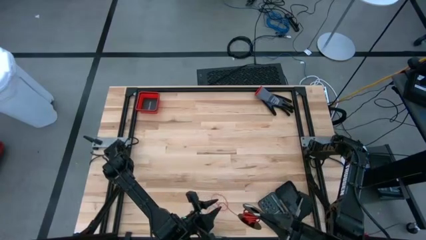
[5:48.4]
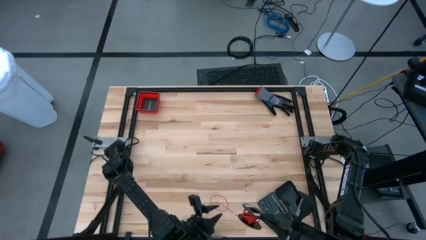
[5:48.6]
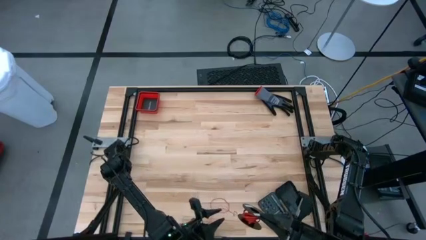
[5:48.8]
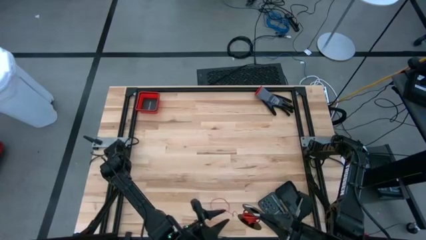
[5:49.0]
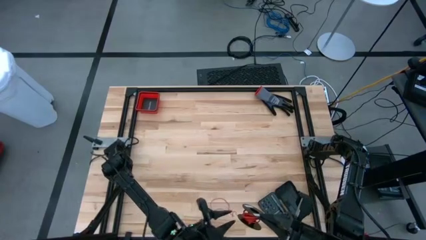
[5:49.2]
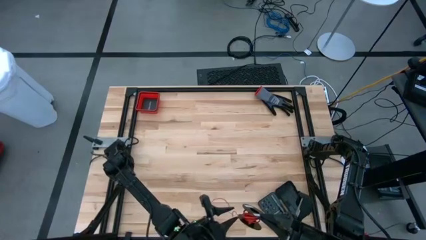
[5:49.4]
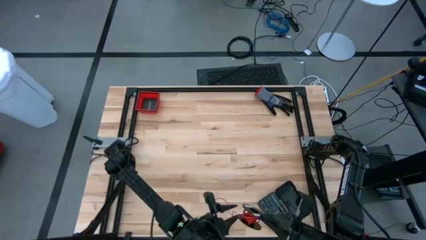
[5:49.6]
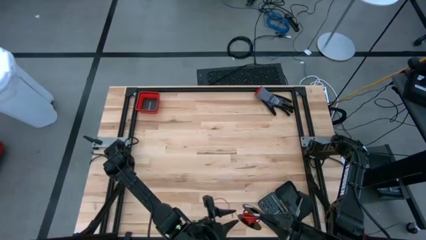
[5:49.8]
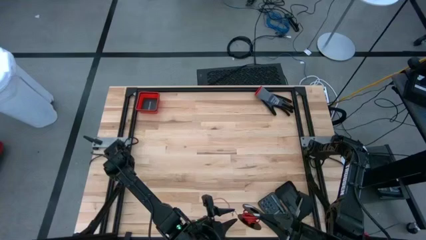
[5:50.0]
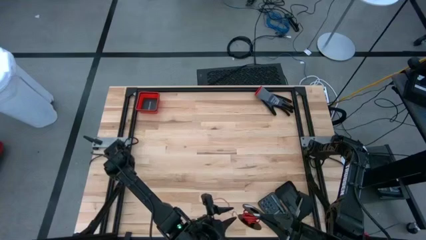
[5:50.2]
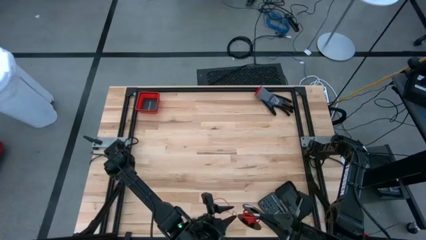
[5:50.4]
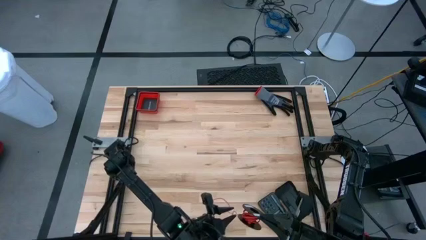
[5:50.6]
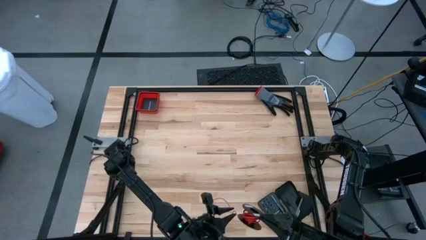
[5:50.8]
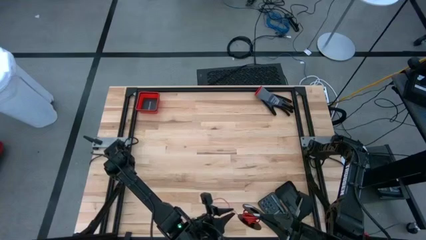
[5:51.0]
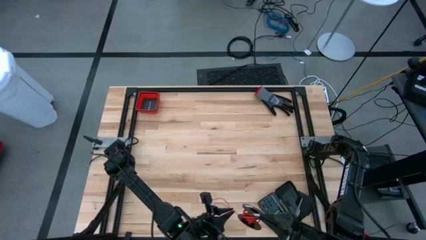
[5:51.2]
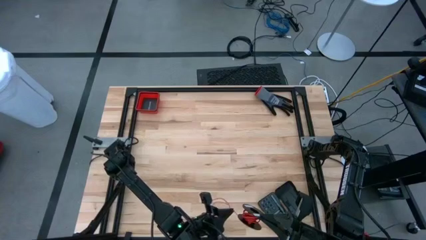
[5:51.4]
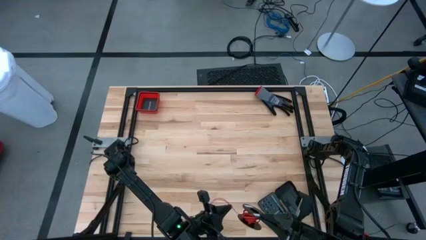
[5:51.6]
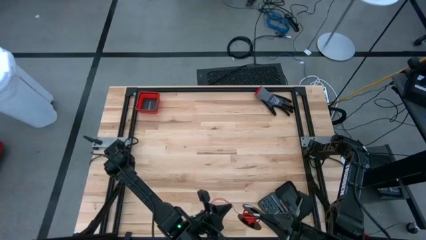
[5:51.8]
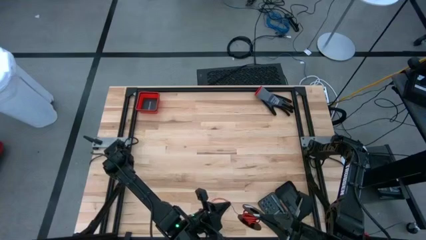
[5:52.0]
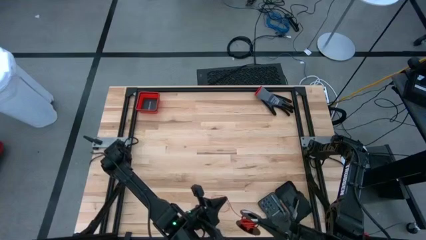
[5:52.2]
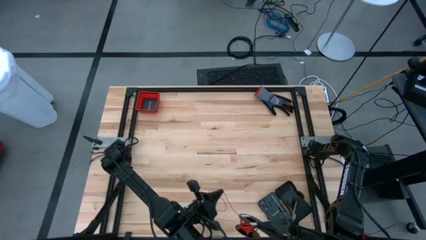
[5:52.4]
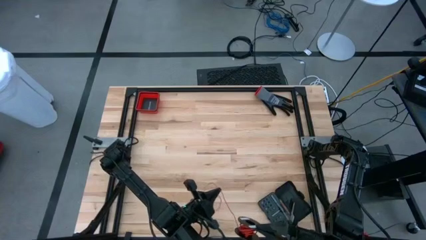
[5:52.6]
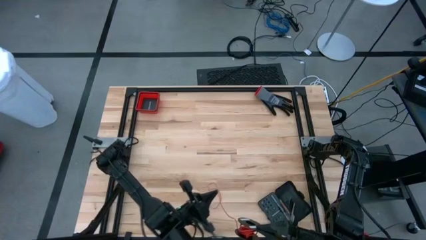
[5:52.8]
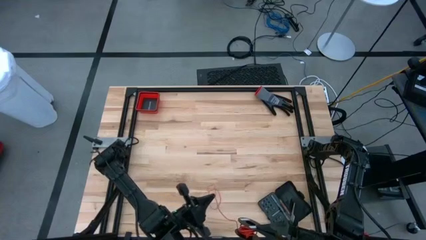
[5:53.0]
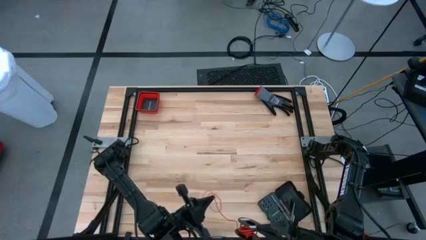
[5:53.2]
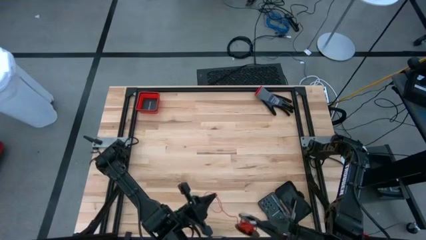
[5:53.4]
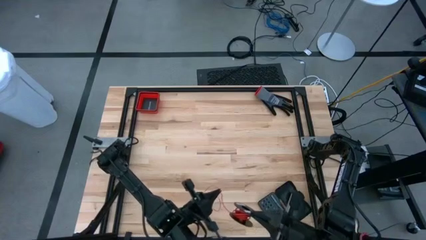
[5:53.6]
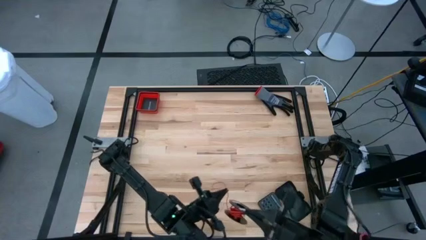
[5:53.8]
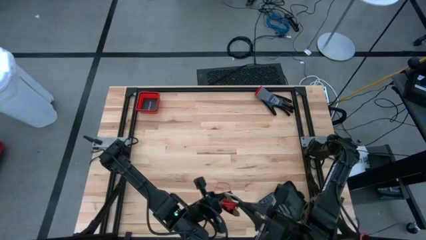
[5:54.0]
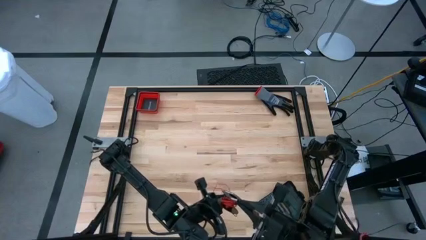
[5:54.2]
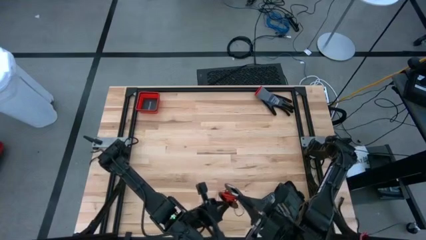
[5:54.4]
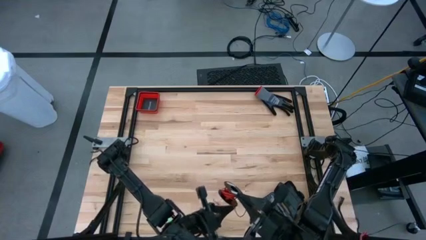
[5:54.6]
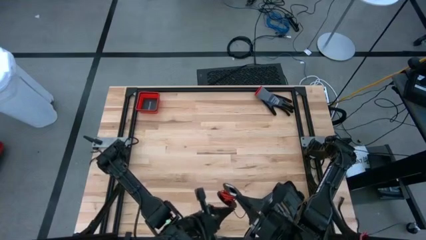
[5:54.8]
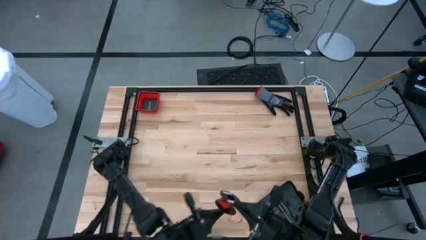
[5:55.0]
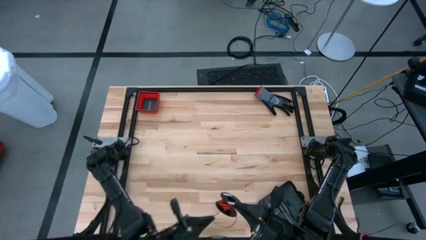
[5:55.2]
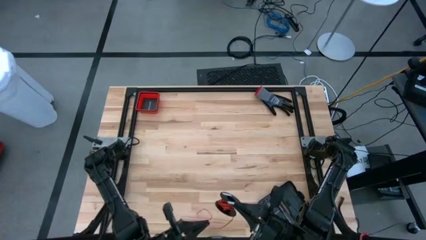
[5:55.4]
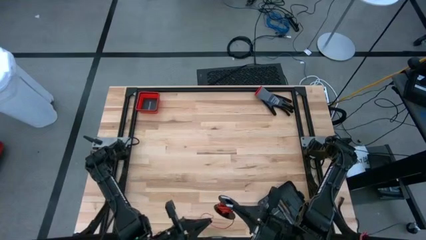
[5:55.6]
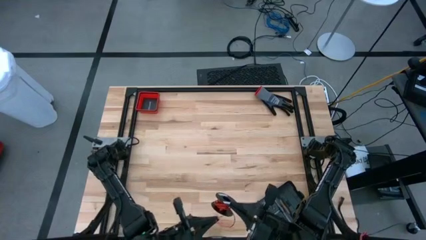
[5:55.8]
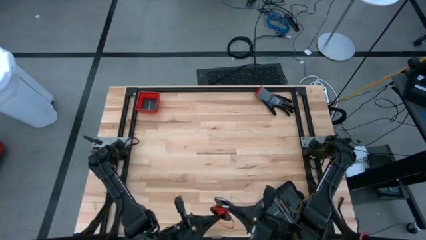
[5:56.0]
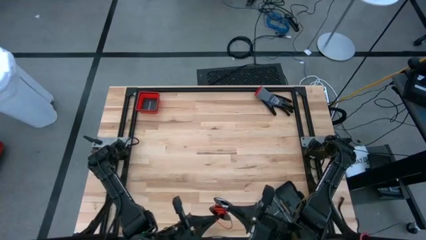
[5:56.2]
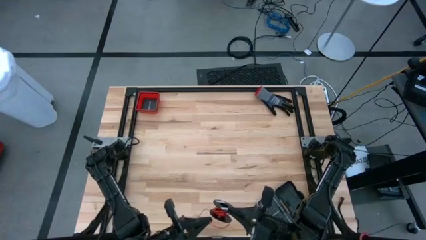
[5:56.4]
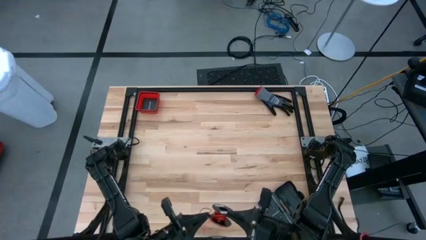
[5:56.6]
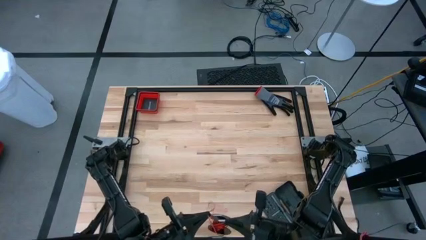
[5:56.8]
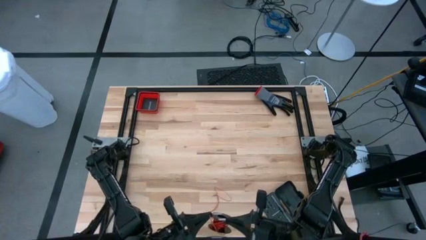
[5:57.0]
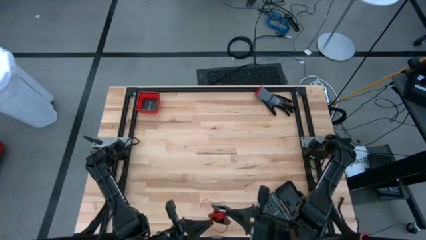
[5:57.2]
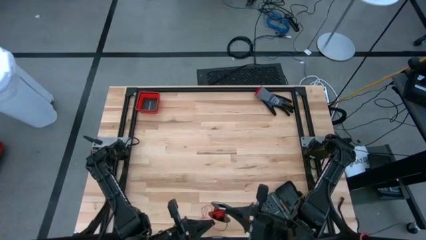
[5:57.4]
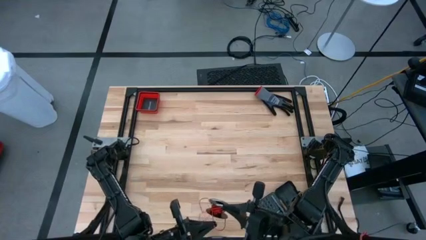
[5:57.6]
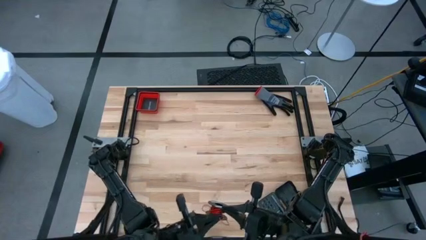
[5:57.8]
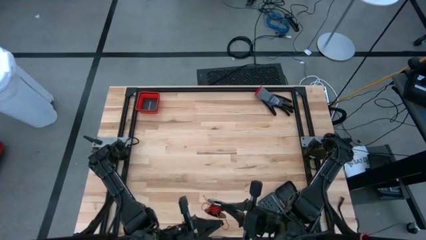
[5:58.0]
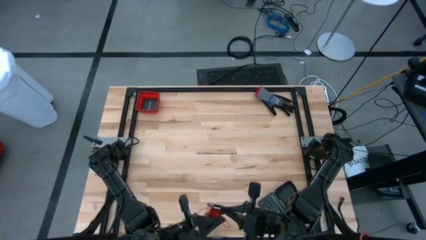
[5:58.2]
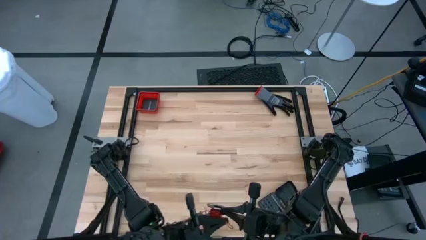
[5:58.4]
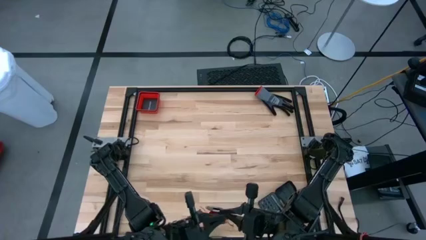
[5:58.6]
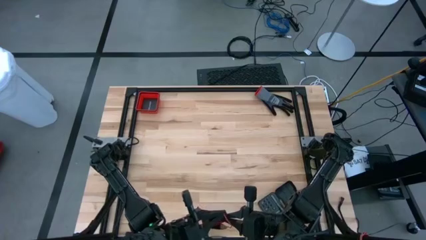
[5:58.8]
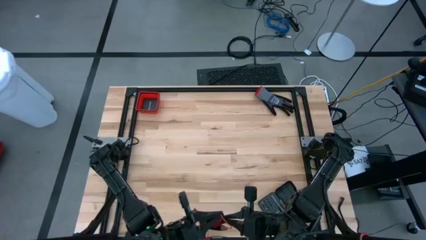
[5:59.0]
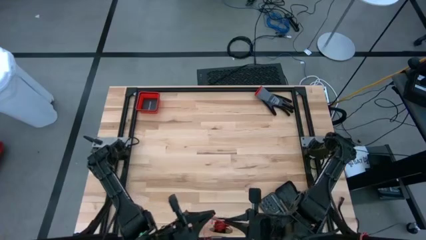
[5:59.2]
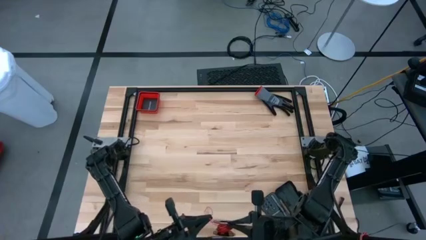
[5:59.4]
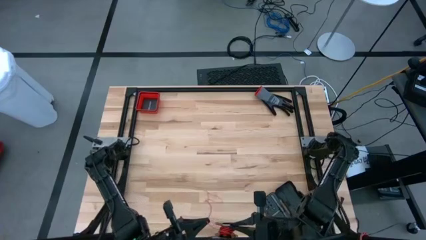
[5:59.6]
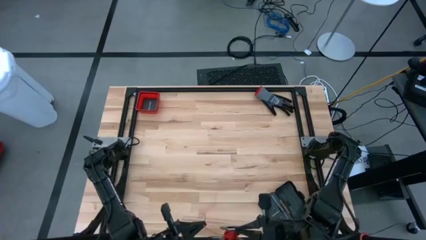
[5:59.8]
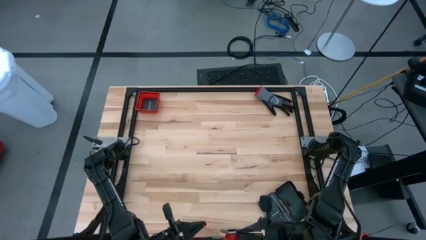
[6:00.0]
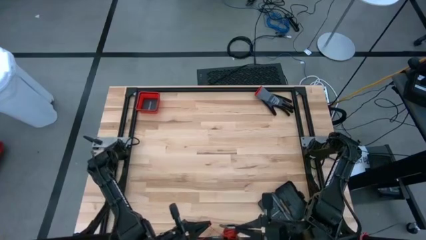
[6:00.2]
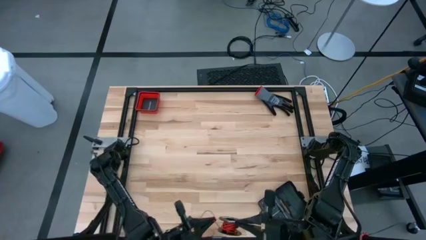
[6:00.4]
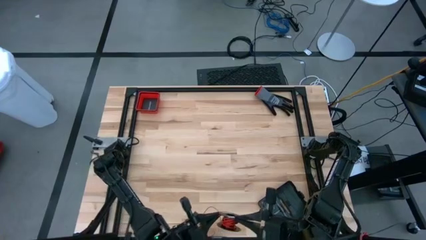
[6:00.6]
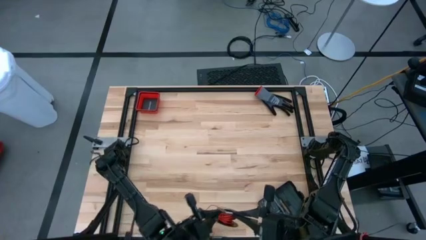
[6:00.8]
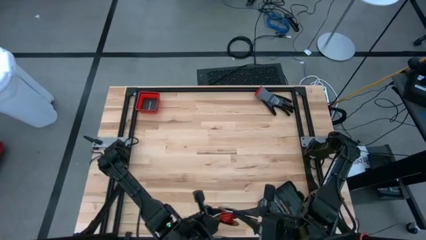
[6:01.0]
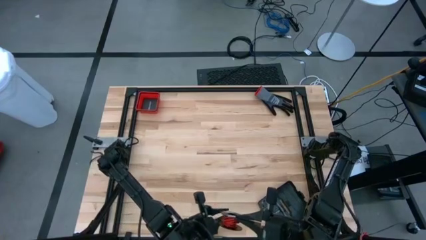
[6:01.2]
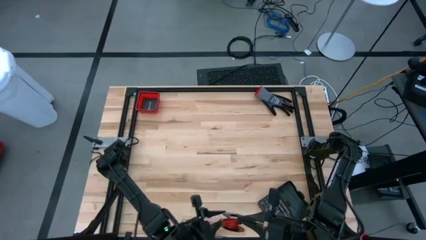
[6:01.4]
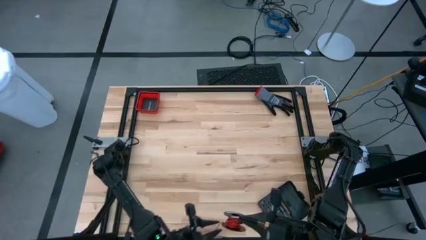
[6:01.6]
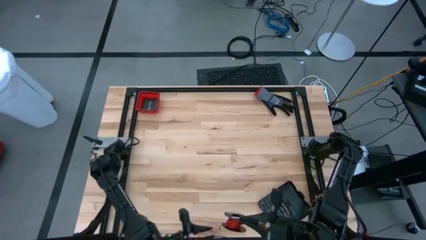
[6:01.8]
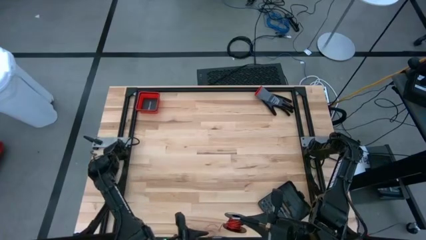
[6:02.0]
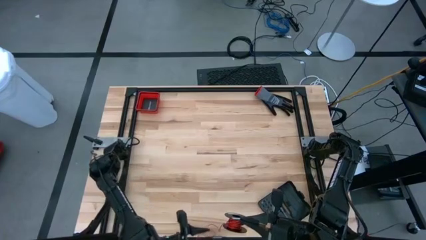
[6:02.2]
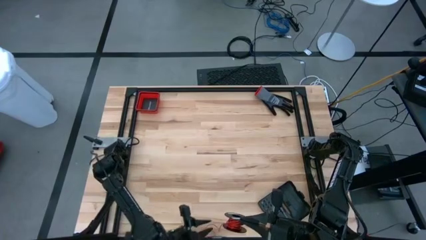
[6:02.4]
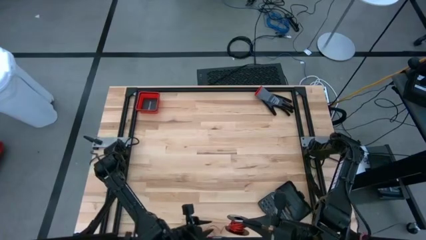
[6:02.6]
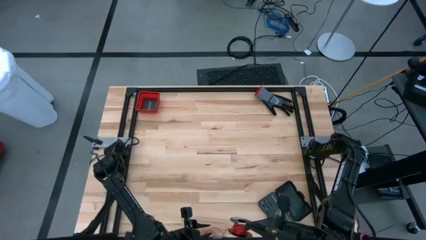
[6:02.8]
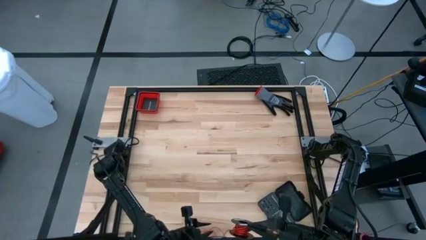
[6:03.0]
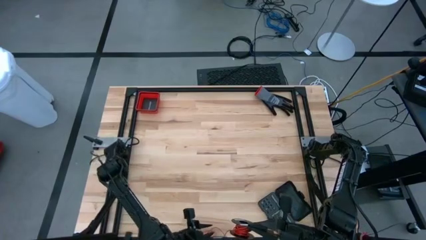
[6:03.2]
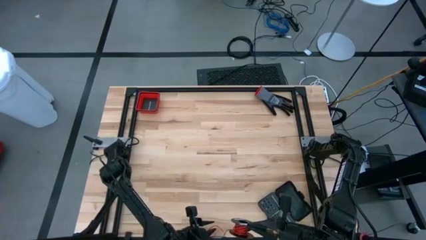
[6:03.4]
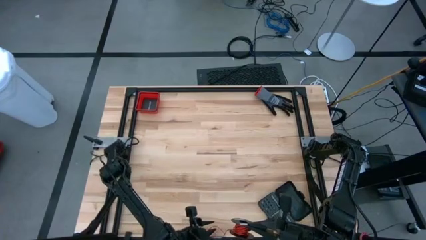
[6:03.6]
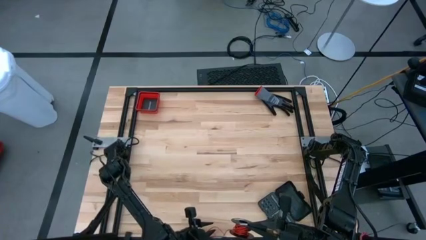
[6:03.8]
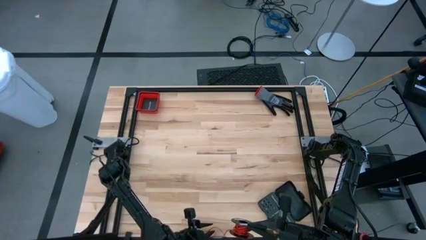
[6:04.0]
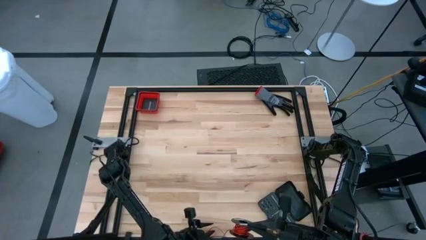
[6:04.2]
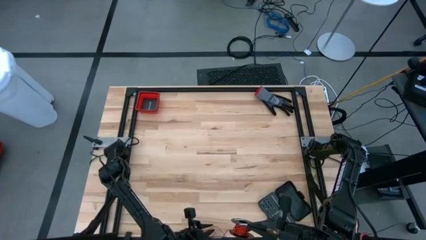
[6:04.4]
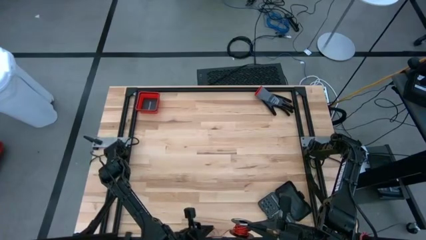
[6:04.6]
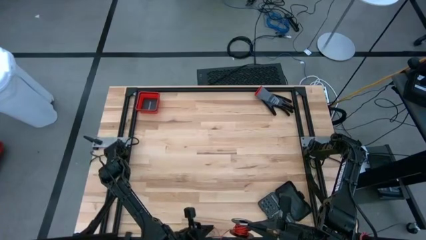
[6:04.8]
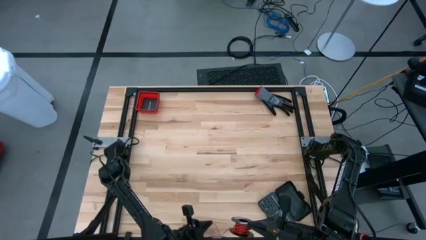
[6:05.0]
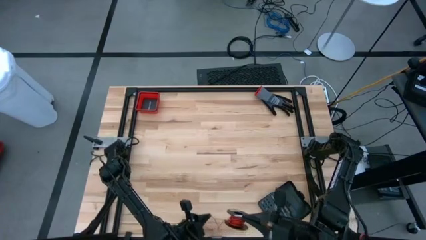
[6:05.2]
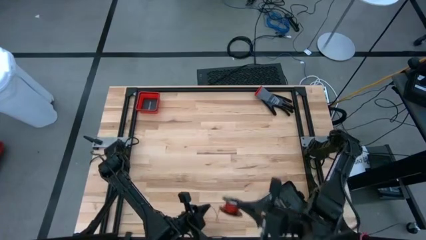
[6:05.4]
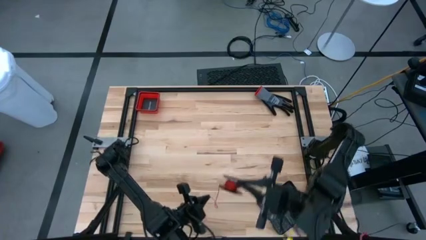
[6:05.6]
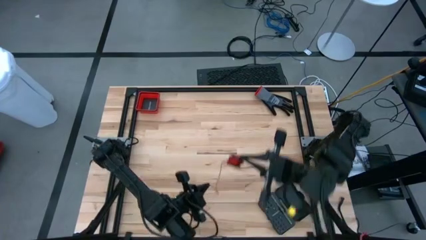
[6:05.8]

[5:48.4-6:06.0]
Task: Coil cords
Coil the red wire onto the spool
